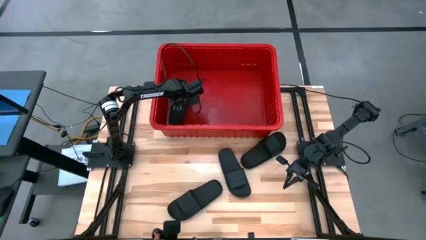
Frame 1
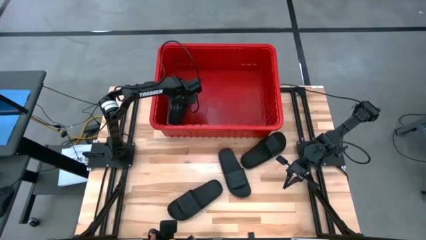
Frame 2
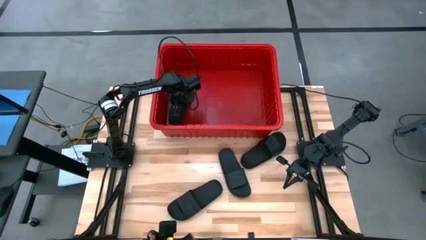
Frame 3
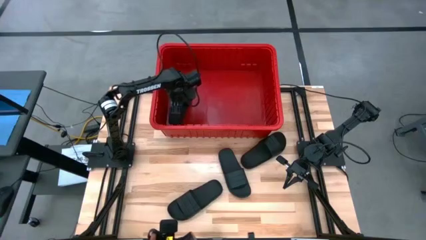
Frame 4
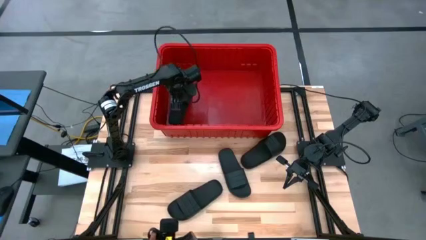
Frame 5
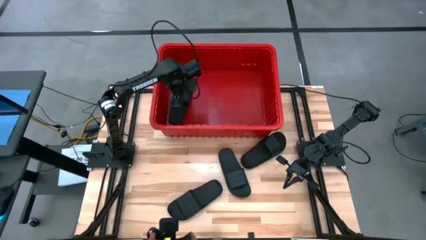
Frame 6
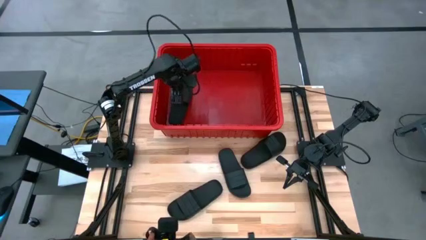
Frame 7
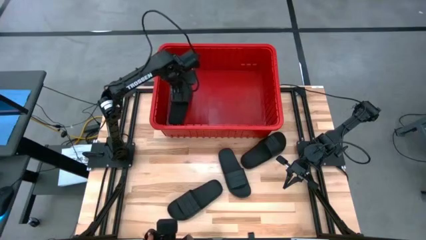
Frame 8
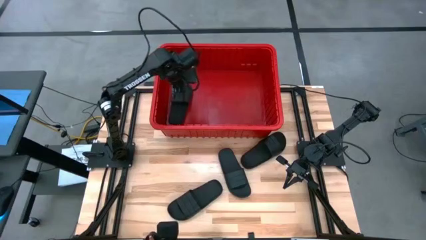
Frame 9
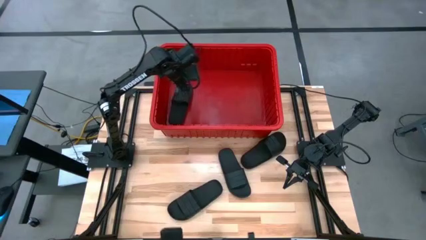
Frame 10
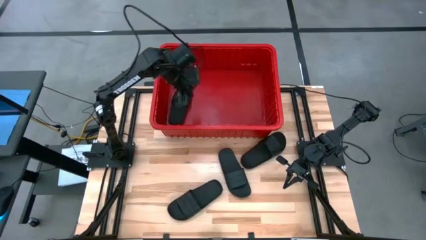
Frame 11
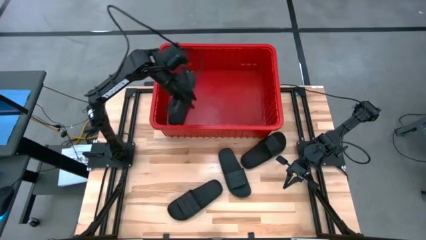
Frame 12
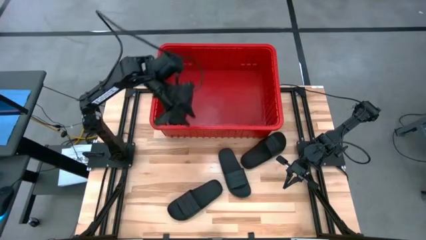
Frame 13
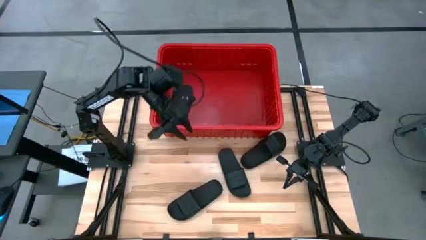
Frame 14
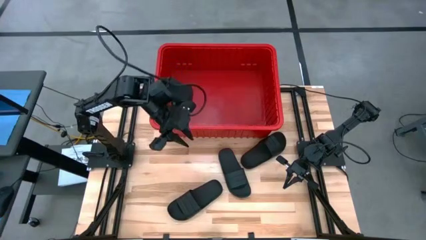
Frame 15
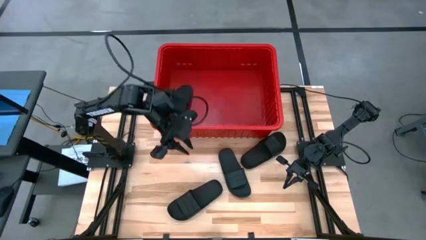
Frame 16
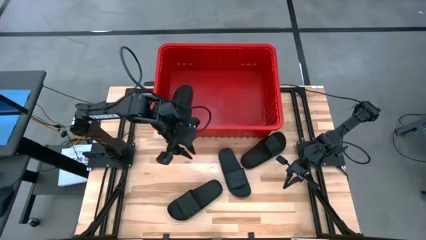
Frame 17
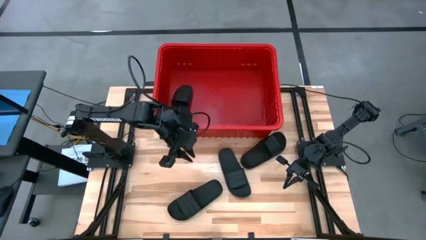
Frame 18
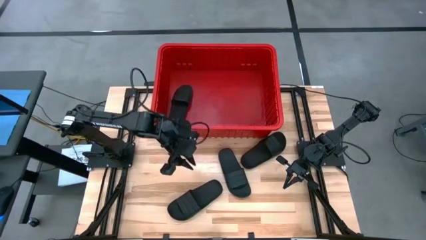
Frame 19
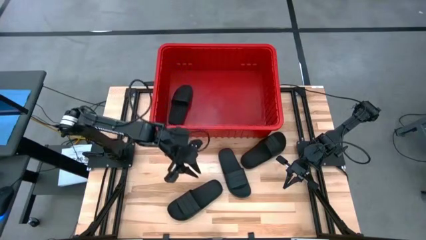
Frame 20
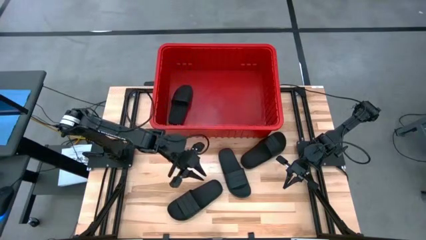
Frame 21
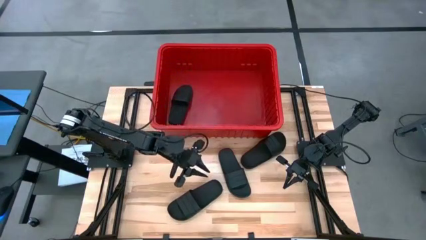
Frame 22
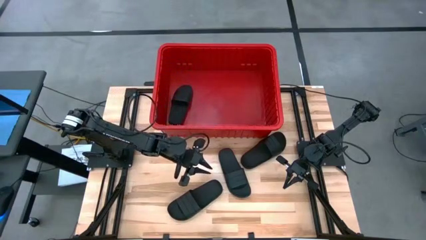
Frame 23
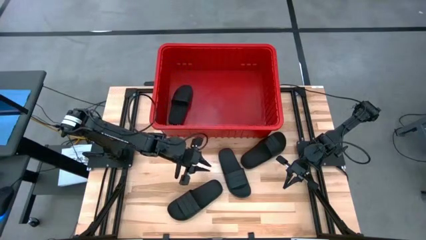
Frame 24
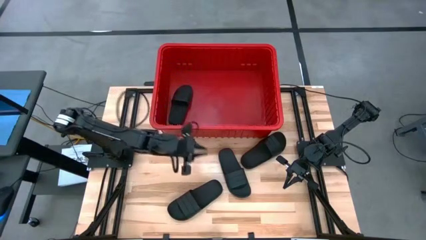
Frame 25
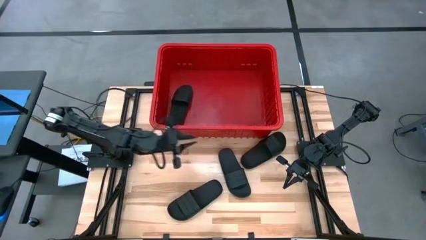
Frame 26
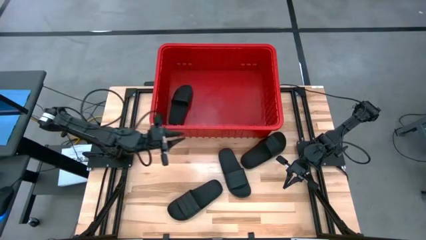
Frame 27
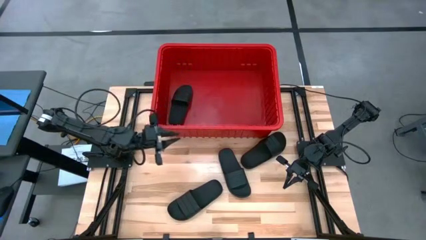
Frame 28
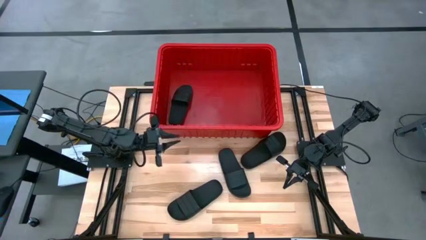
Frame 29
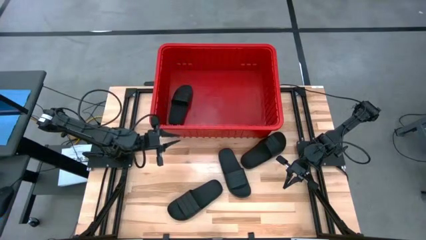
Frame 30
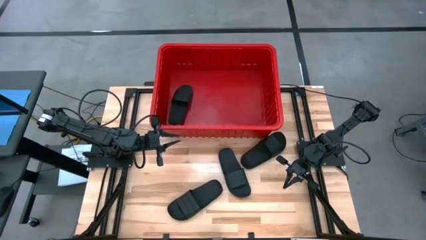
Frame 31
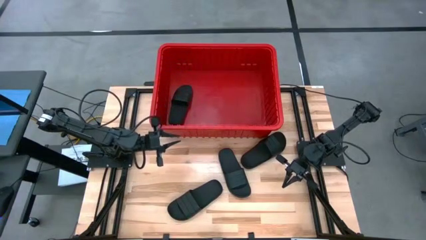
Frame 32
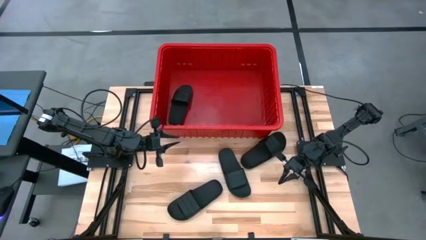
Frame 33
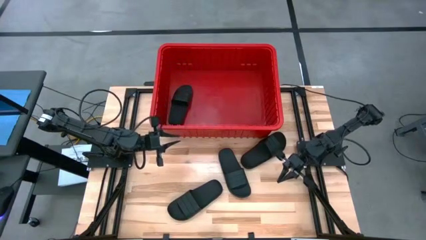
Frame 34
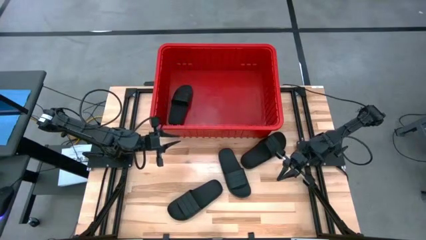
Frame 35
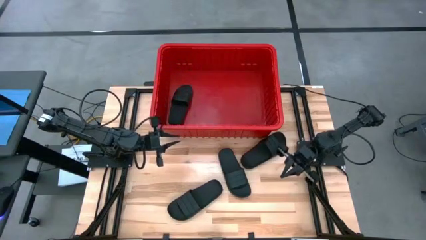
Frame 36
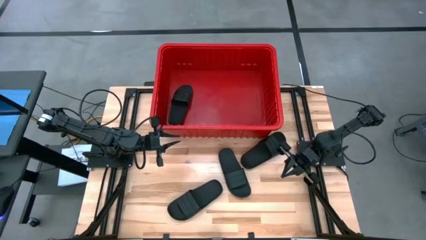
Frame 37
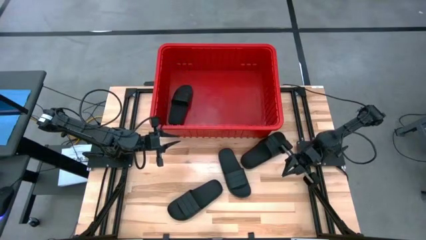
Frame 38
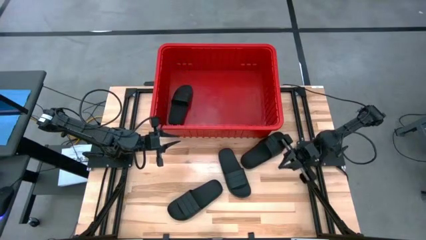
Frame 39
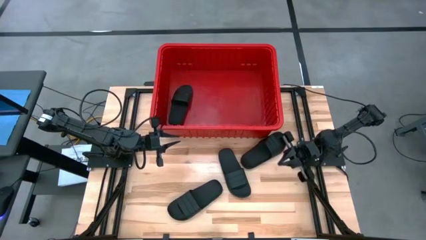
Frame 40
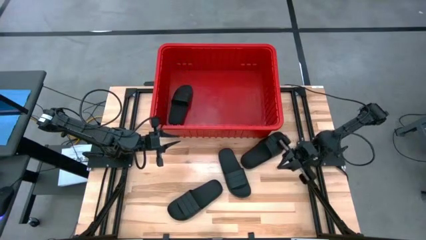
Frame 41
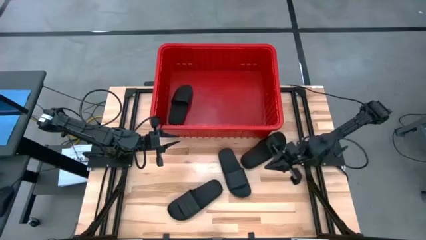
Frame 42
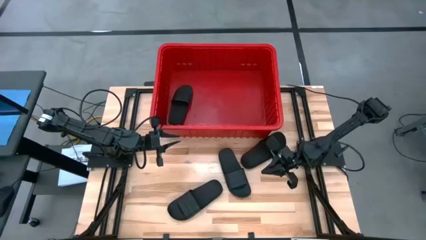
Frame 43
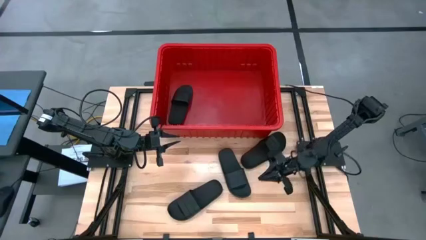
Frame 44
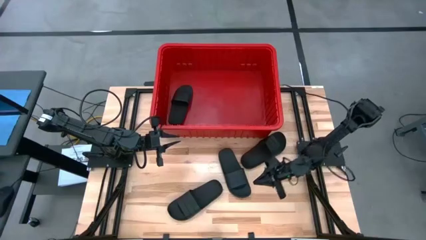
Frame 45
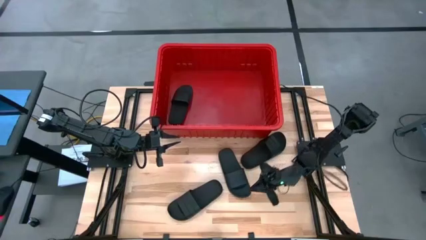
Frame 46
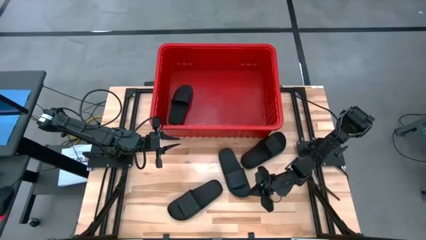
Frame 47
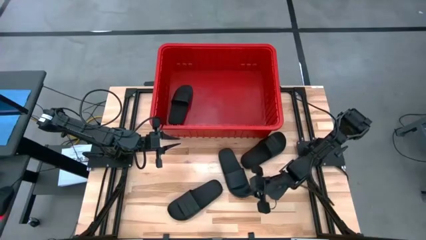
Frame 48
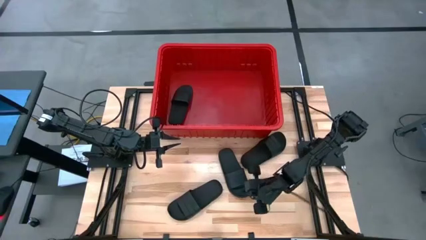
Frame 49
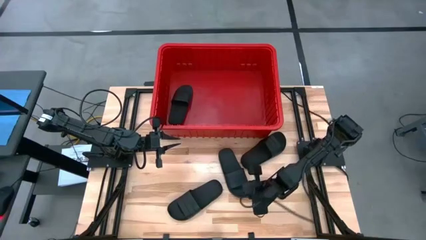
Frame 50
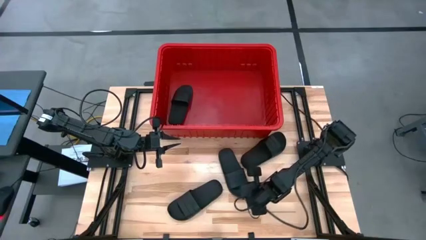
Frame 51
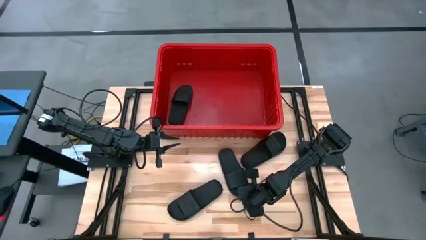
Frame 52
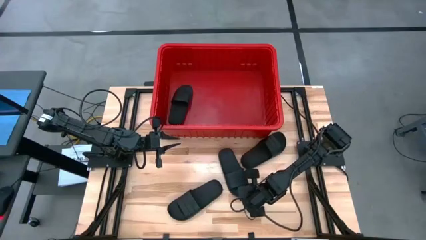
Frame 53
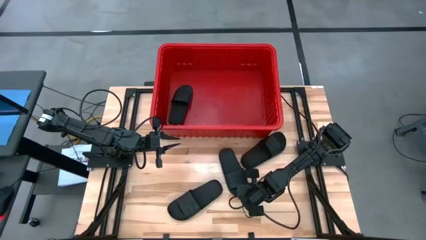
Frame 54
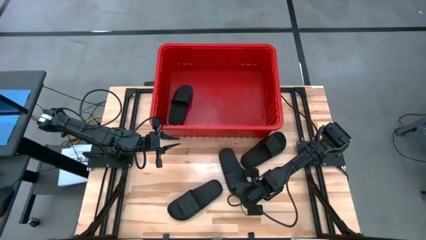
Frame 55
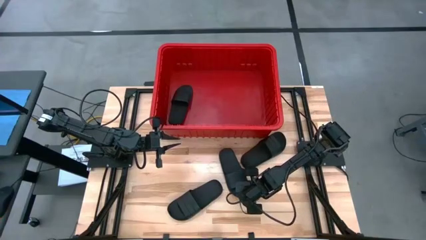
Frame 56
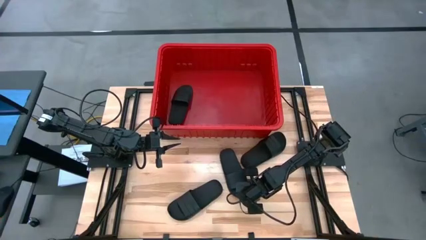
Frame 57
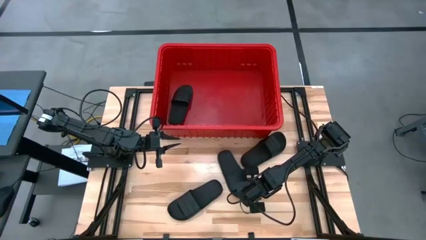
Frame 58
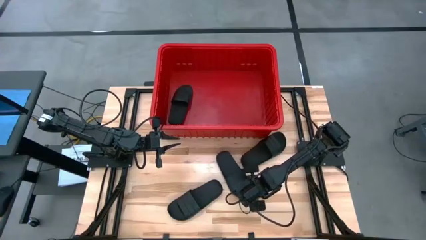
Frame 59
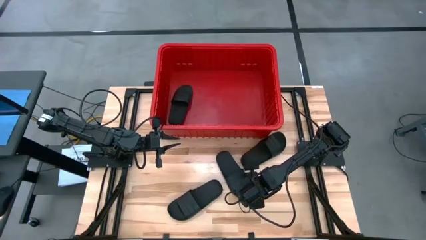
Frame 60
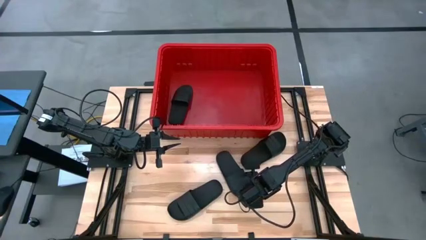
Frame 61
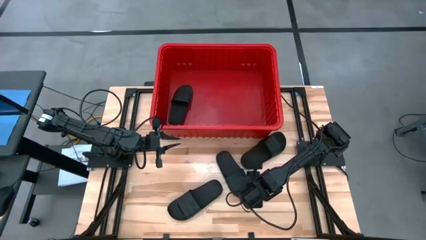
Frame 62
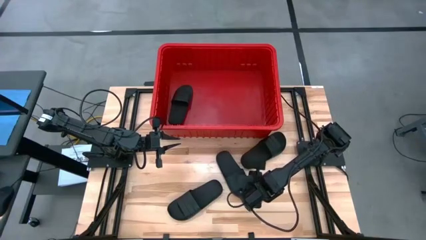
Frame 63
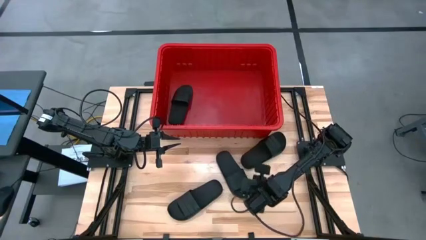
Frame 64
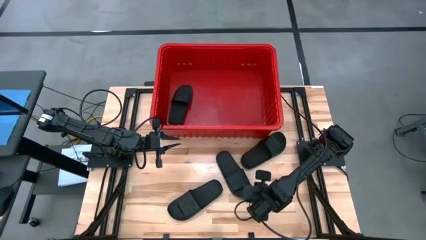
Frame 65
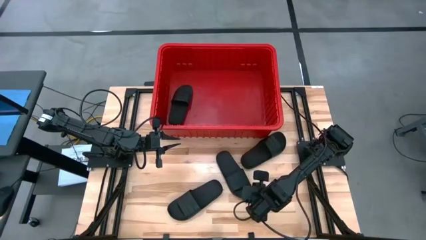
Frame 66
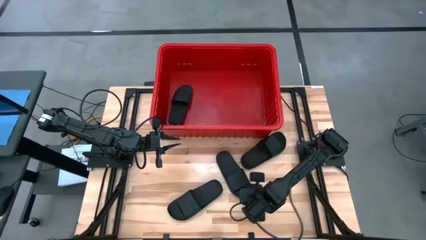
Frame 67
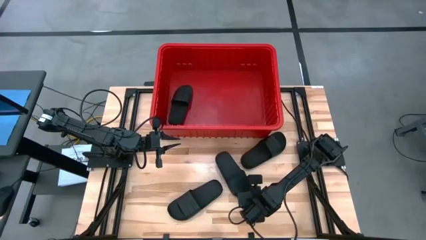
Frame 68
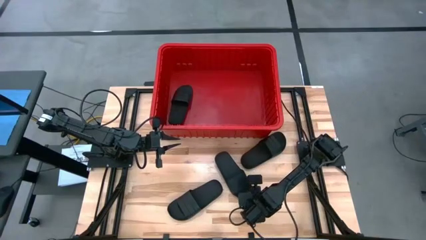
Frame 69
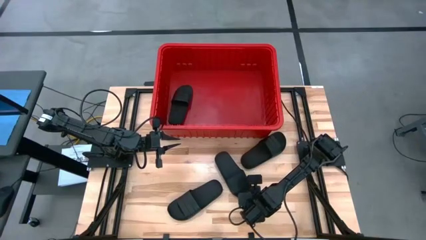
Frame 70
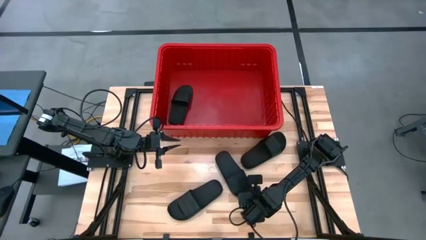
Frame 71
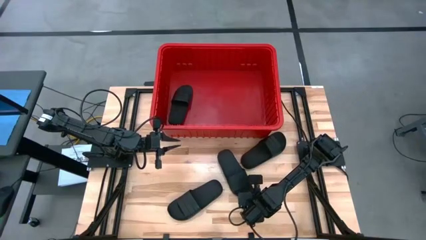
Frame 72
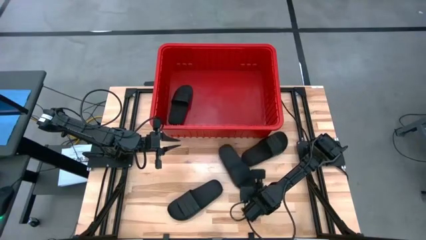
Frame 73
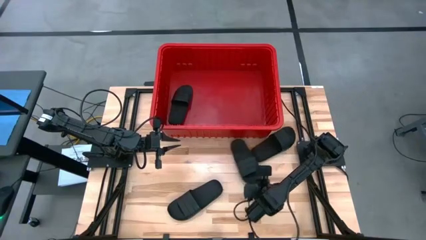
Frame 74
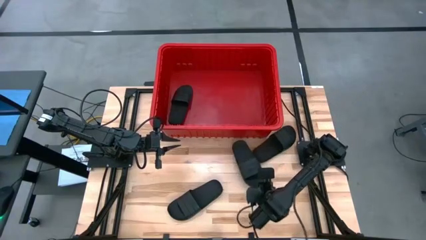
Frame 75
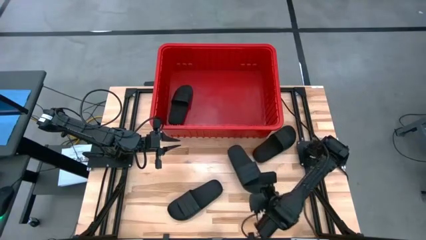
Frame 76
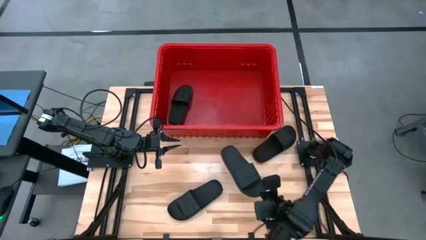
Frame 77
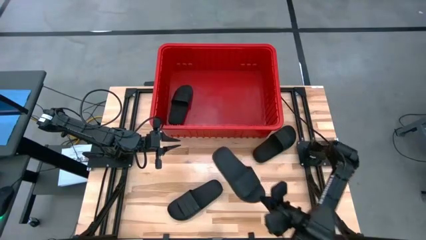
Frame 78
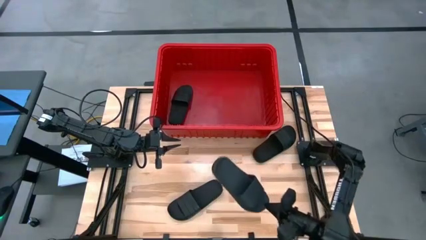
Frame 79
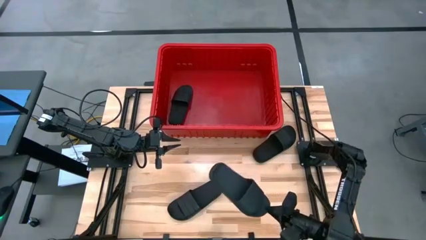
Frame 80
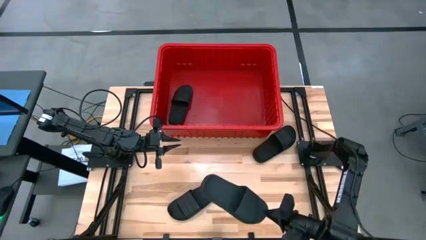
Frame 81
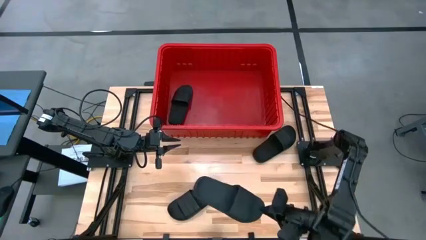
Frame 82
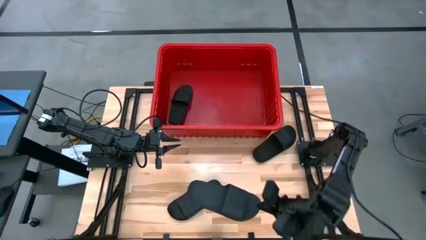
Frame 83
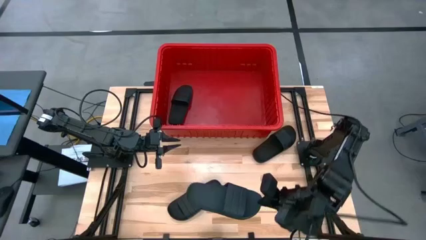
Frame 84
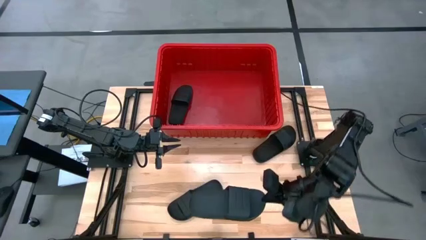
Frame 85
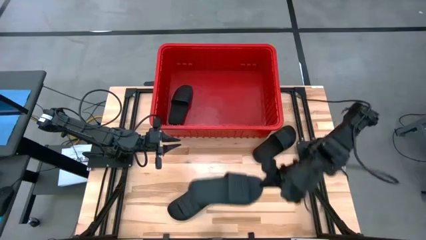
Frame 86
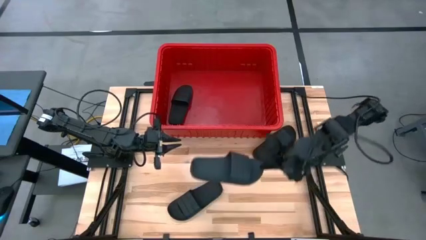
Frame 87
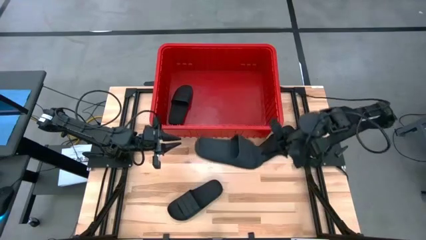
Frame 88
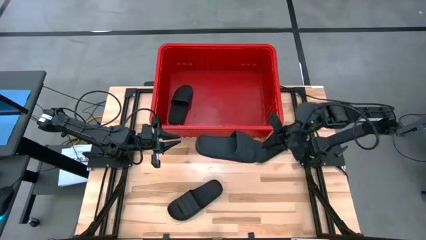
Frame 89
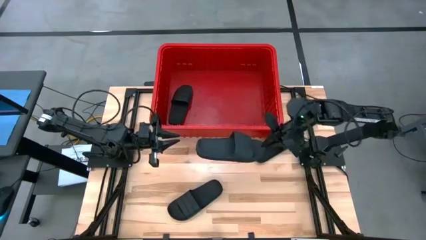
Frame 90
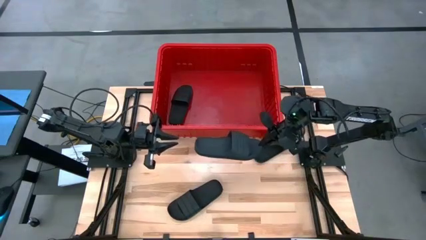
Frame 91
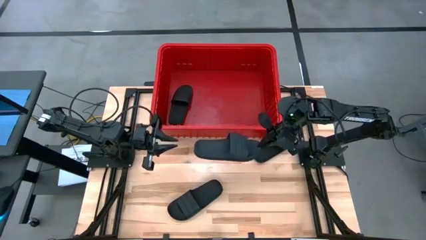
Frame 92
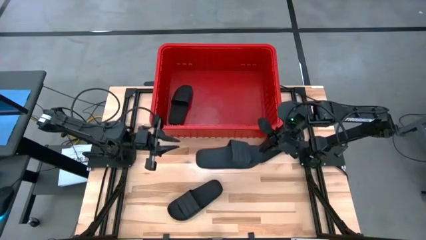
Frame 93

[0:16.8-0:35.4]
Task: Pick and place slides into bin
Stack the middle slide on top of the slide in the bin
